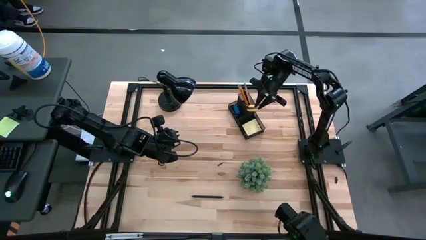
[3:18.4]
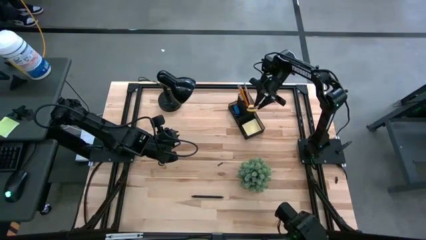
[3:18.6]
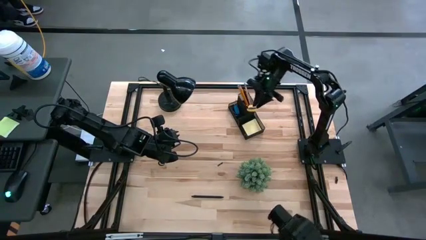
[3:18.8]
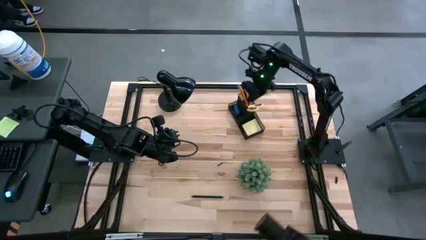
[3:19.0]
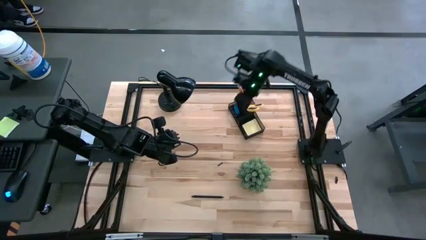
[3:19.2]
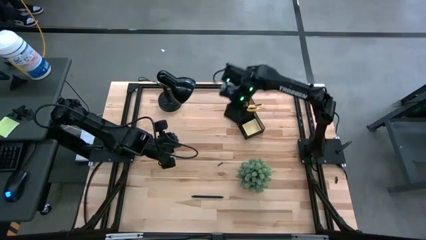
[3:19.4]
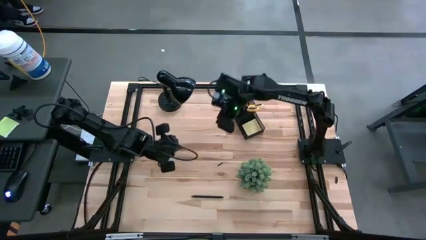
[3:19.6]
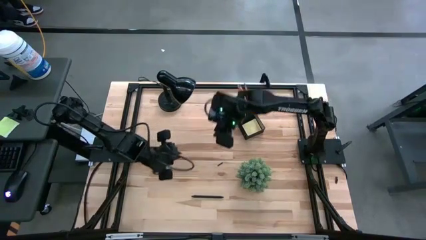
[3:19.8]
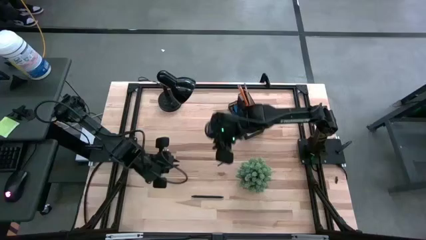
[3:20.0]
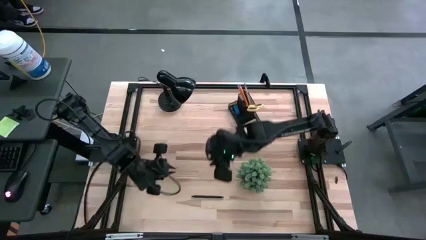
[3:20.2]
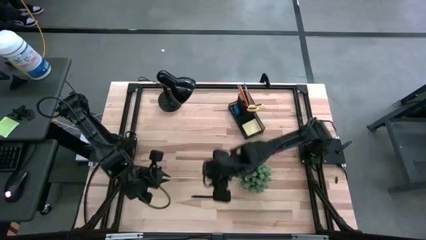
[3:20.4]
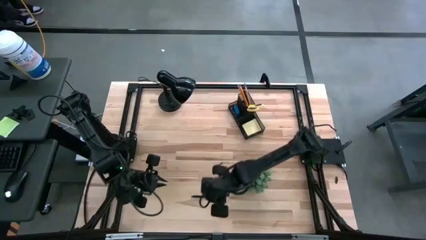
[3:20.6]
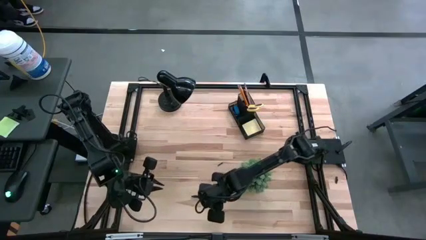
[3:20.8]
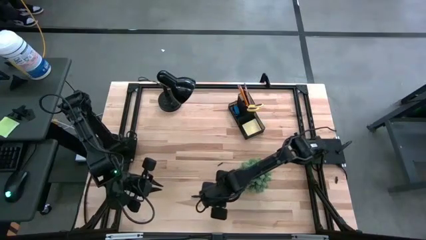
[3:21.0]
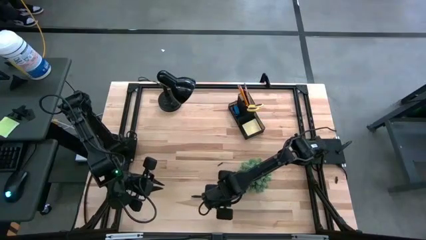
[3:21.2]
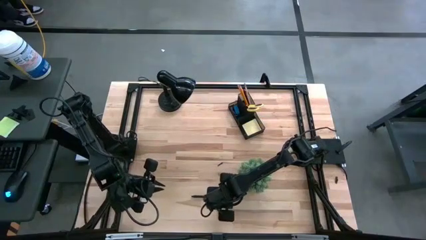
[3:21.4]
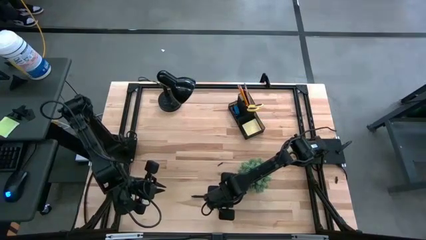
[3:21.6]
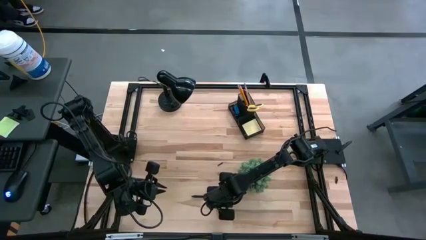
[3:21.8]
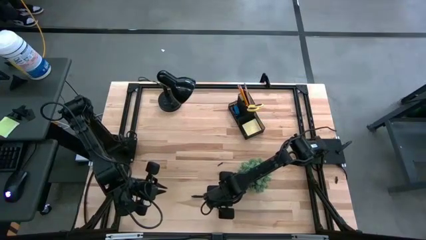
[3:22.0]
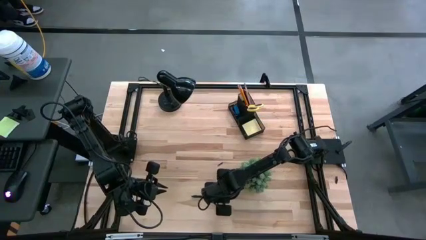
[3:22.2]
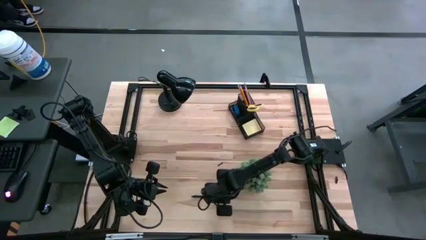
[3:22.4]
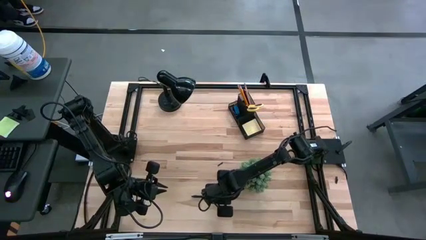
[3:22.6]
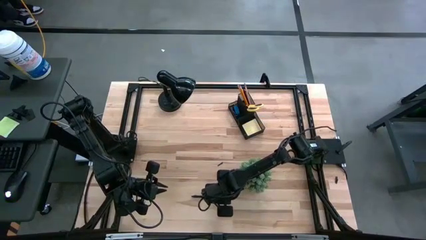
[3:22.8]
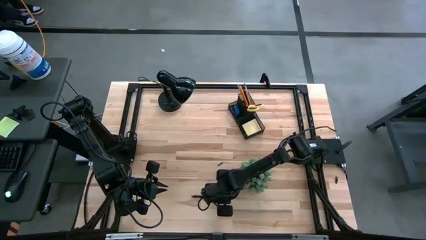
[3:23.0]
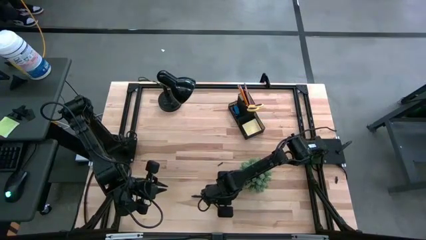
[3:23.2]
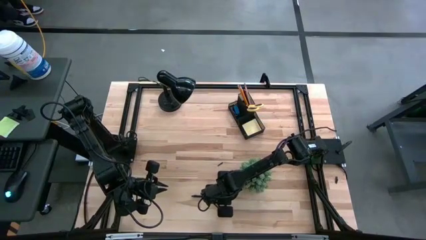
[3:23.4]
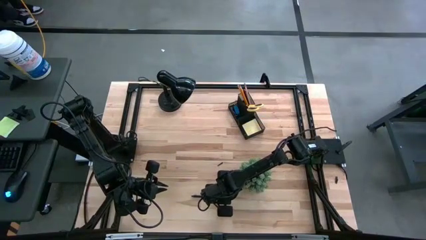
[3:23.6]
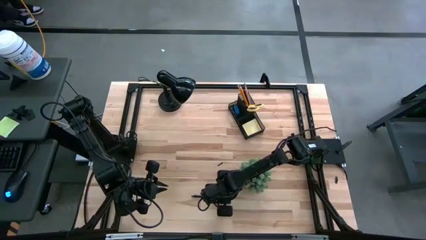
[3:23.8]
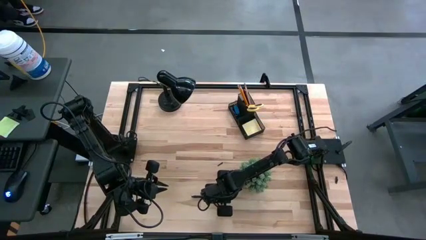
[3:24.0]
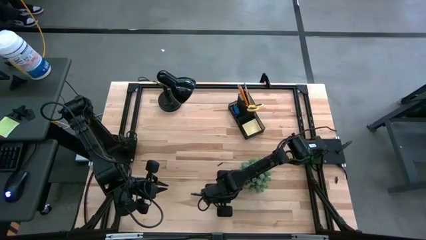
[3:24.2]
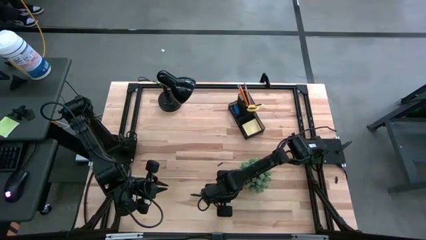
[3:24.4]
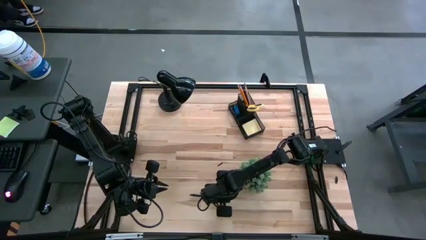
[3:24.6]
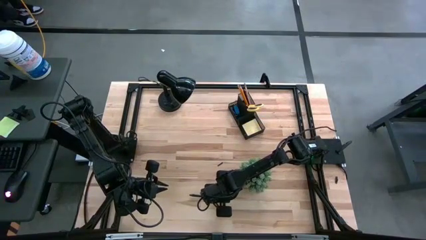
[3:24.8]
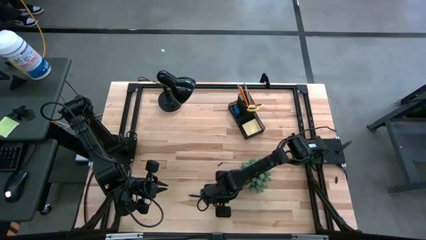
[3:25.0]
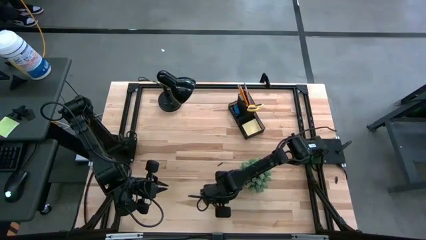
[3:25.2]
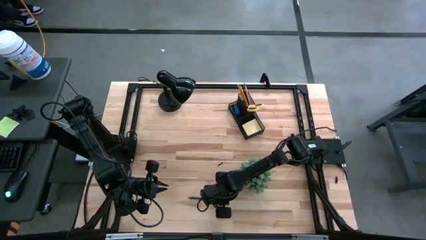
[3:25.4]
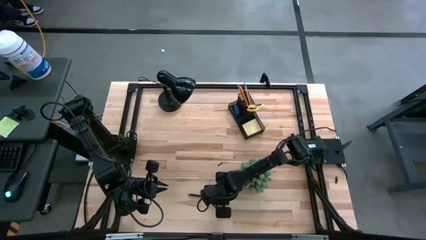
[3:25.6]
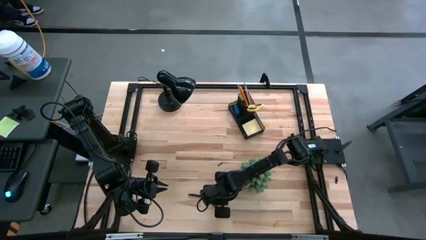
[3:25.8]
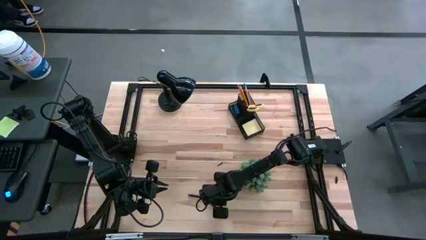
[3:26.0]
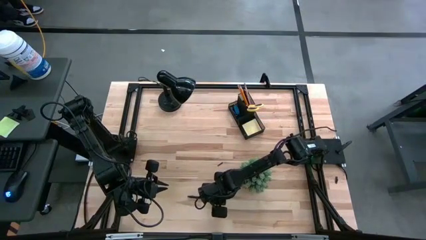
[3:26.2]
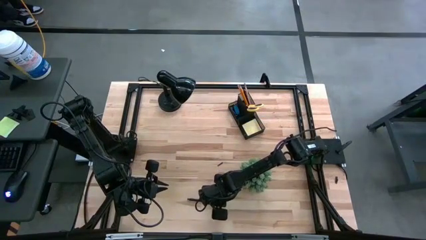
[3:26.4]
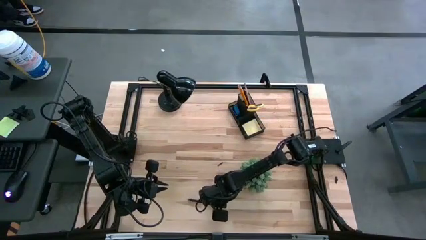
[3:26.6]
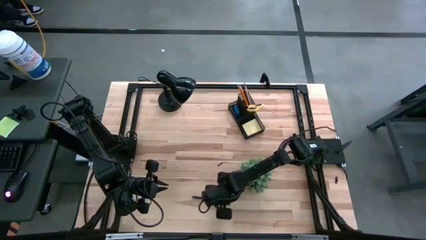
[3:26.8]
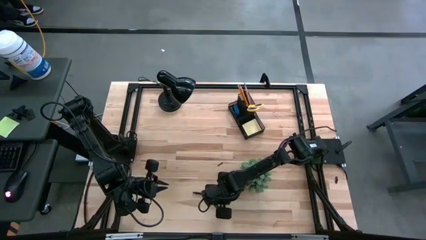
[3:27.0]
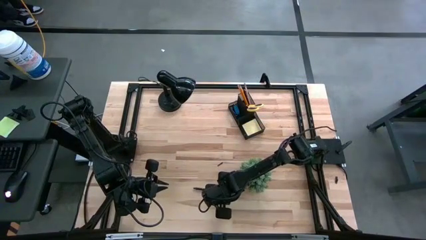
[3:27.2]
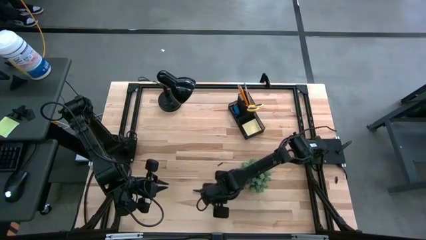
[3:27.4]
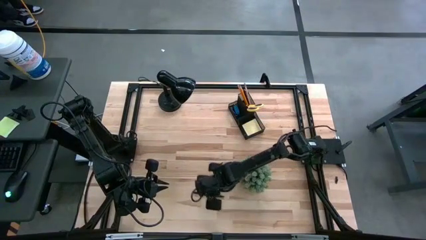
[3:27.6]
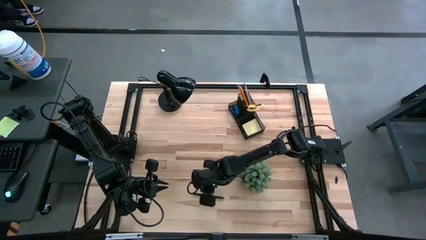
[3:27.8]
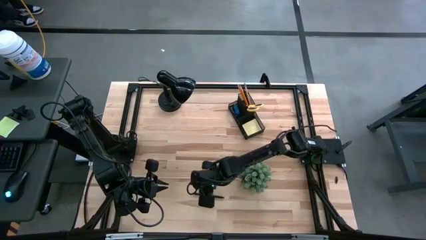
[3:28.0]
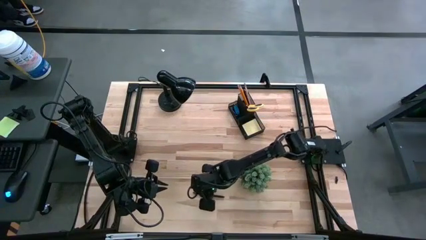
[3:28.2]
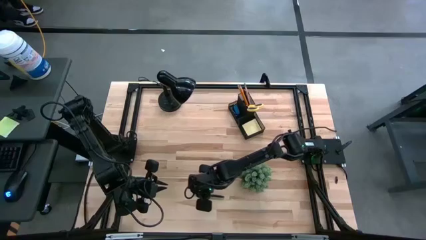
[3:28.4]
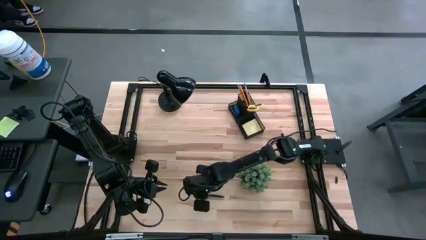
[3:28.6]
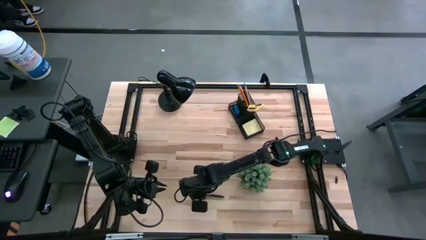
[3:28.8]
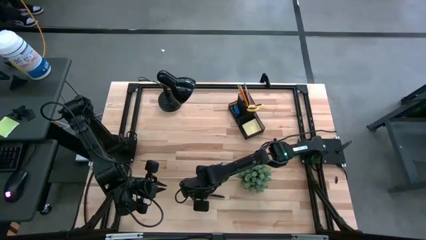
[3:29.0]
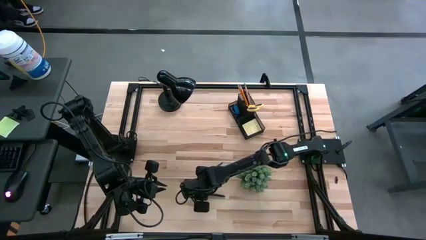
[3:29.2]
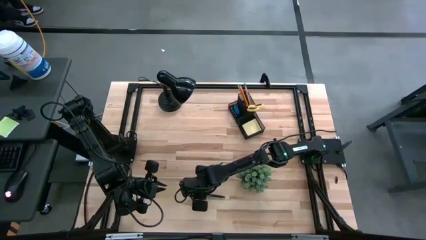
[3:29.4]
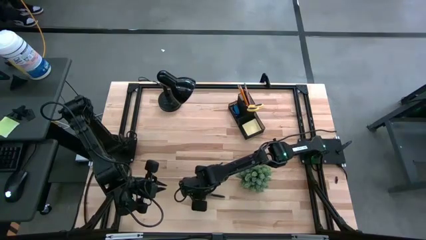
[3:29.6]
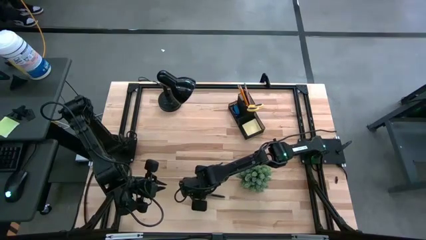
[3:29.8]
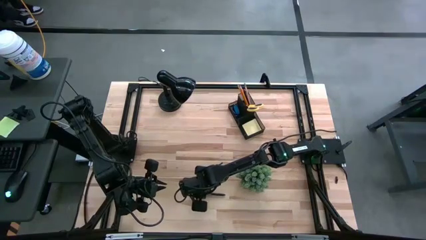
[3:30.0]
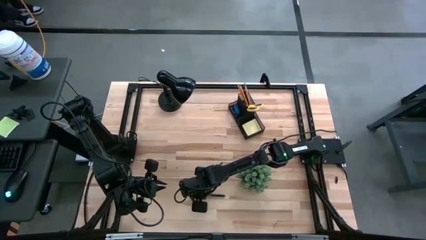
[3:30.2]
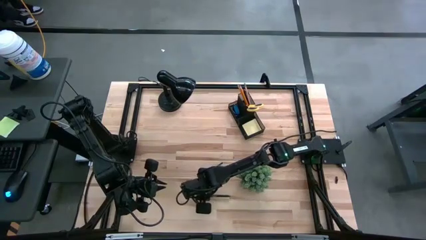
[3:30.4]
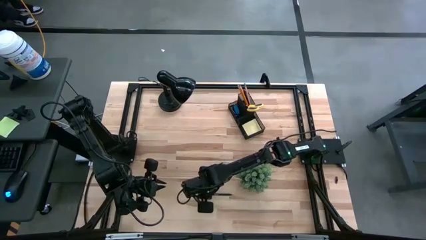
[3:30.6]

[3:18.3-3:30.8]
Task: Pick and place office supplies into organizer
Put the black pen into the desk organizer

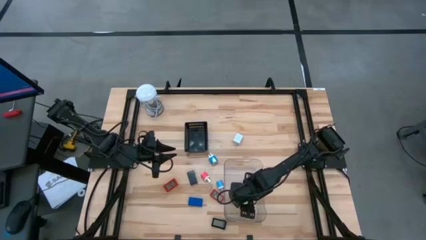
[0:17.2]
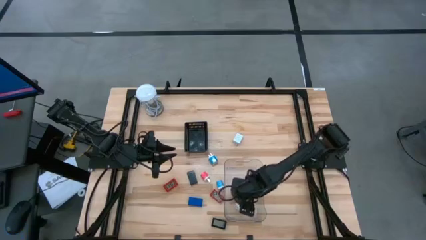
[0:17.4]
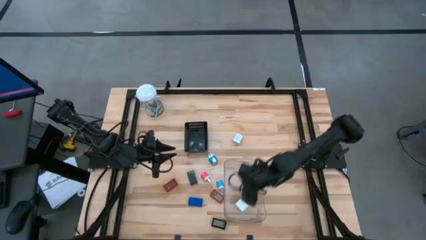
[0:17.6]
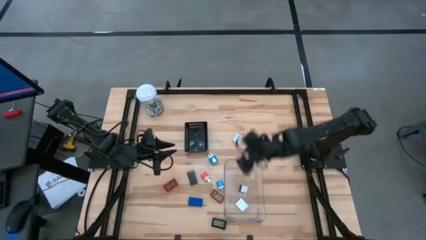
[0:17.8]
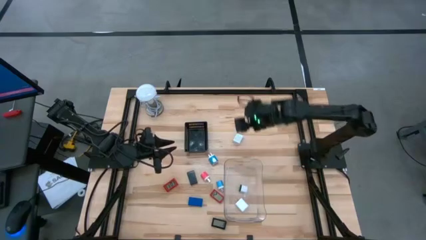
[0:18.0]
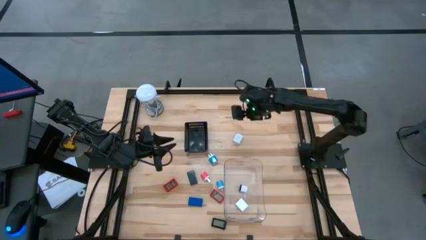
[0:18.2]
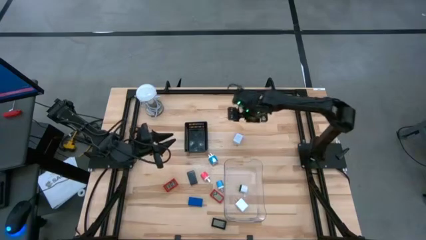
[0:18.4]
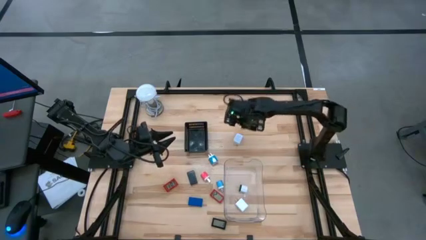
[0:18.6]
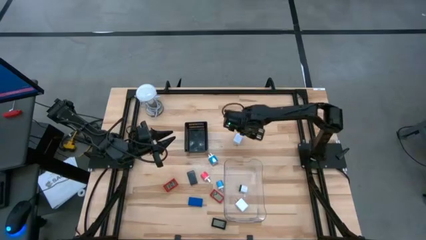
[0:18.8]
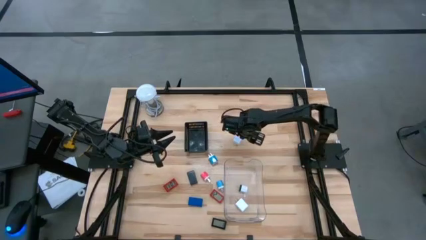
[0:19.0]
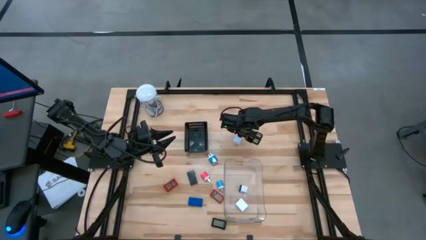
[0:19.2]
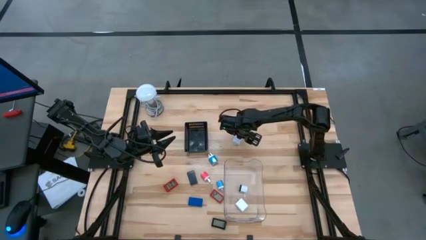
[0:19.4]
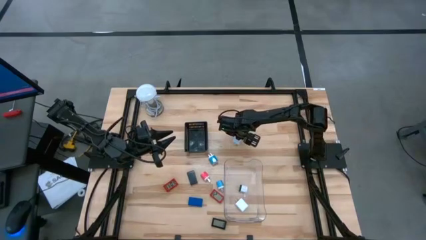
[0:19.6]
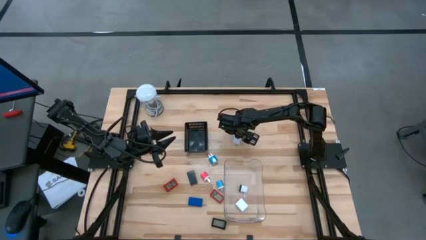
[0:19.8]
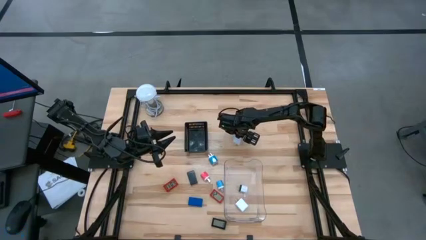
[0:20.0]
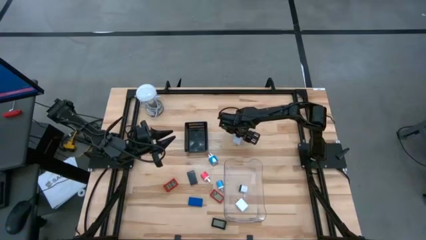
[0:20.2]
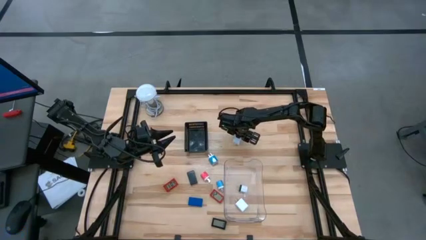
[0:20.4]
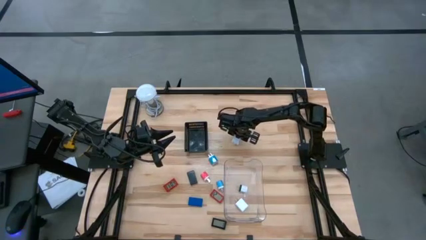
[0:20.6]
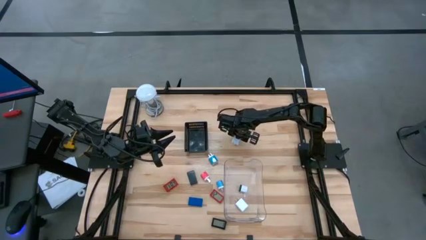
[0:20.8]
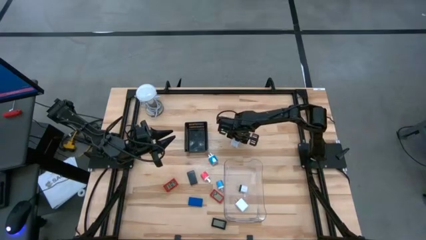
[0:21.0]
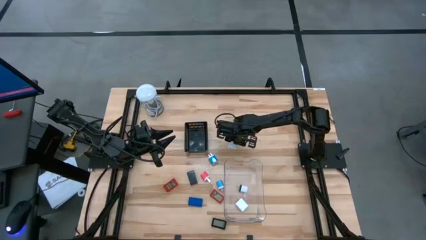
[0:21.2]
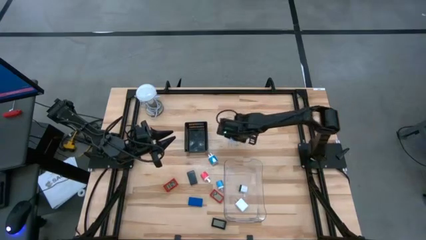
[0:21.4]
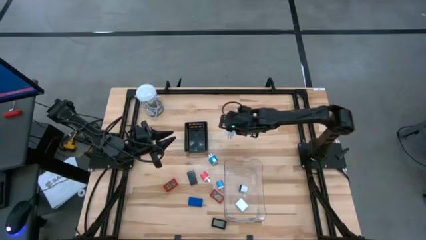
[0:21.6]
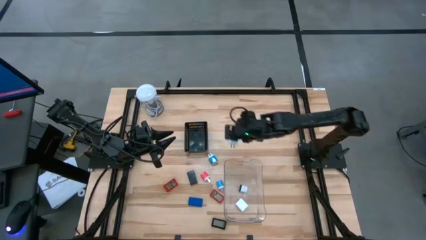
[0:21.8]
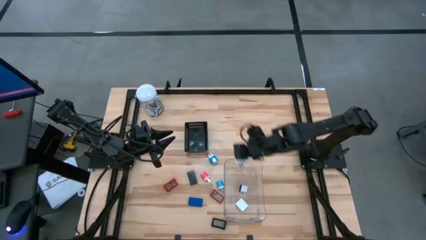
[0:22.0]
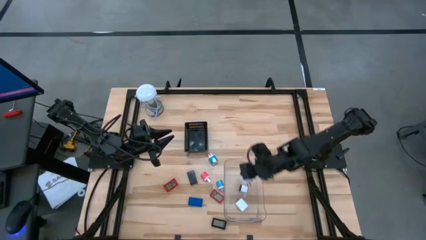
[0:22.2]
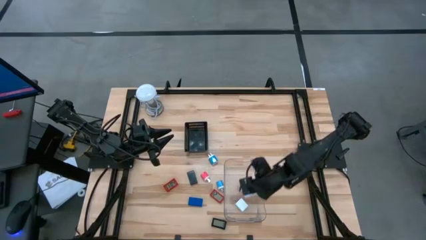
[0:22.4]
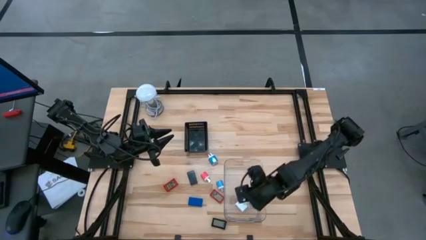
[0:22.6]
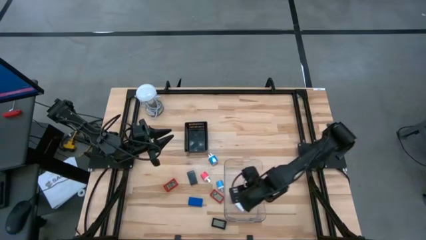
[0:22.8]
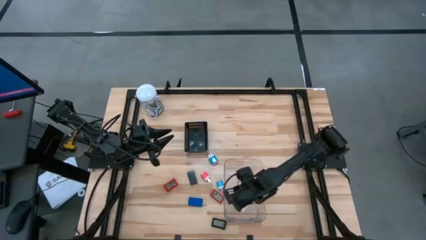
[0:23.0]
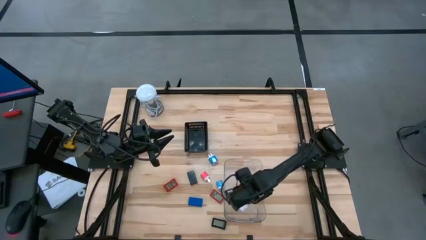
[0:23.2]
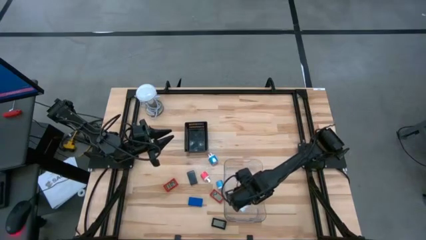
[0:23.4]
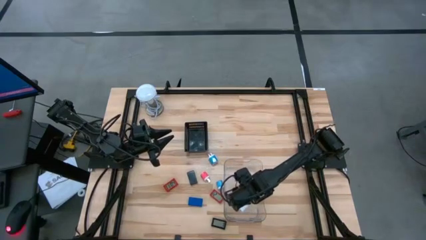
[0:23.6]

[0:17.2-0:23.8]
Task: Pick & Place Office items
Put the white charger adapter into the transparent bin
